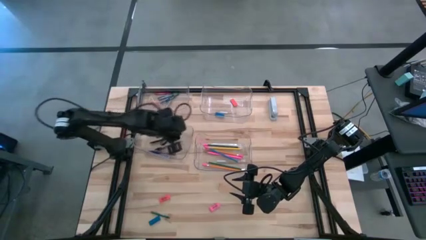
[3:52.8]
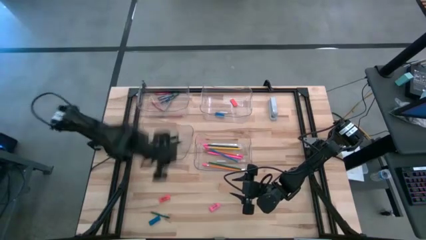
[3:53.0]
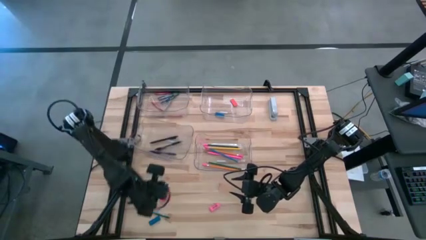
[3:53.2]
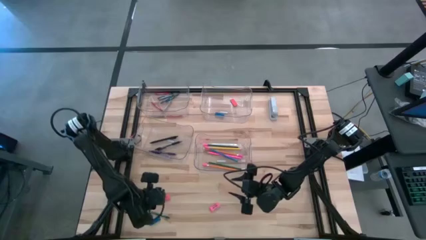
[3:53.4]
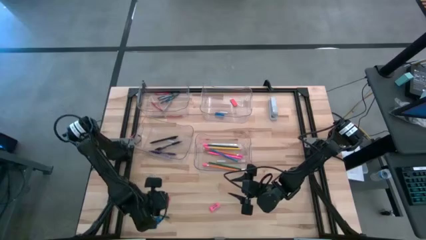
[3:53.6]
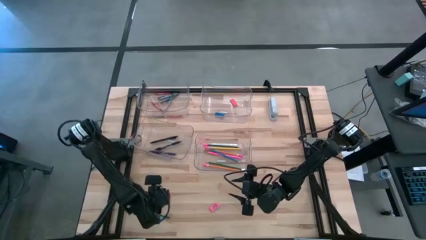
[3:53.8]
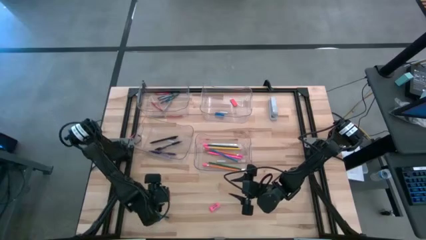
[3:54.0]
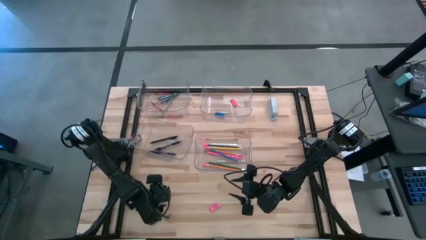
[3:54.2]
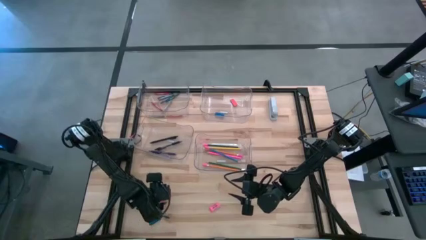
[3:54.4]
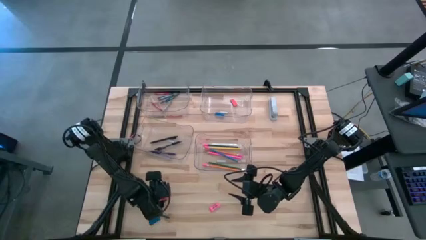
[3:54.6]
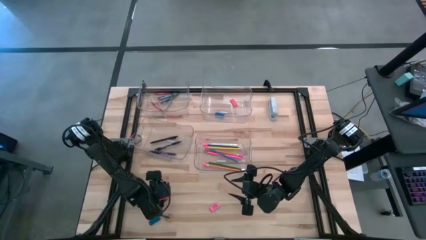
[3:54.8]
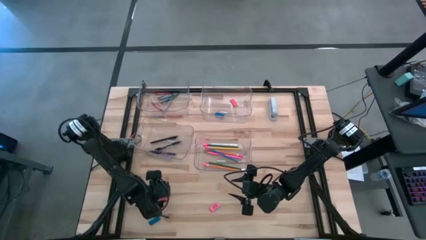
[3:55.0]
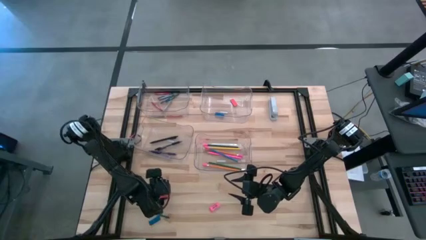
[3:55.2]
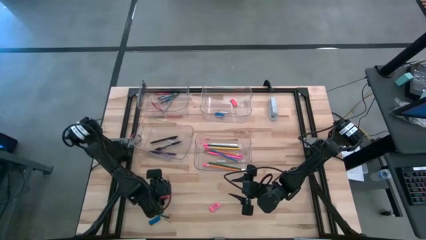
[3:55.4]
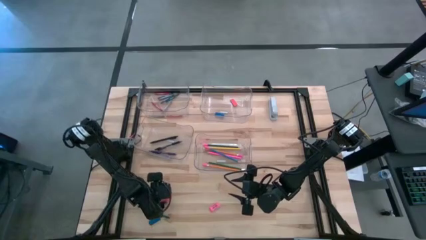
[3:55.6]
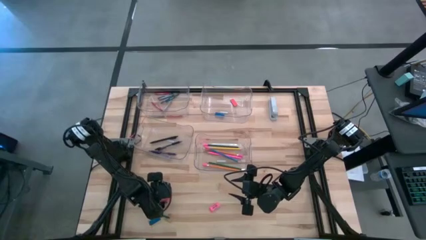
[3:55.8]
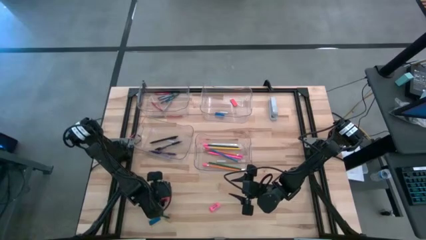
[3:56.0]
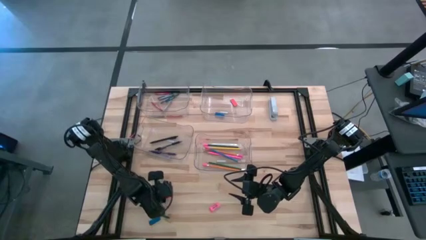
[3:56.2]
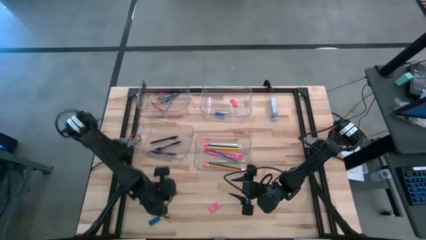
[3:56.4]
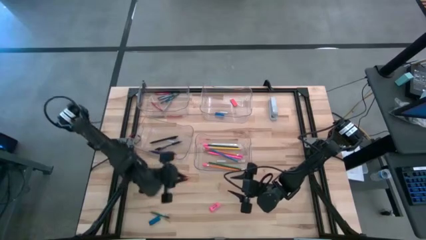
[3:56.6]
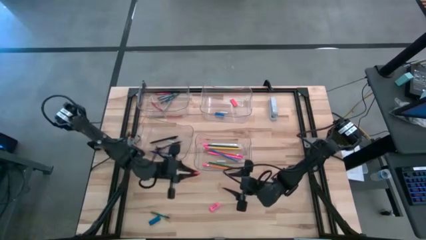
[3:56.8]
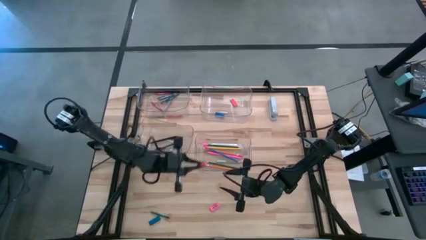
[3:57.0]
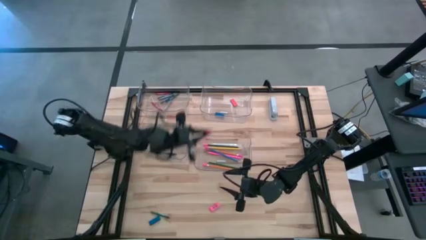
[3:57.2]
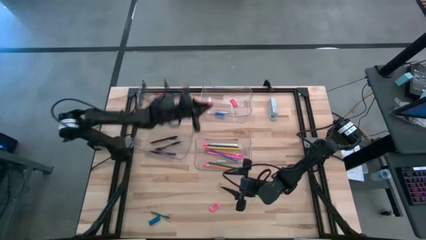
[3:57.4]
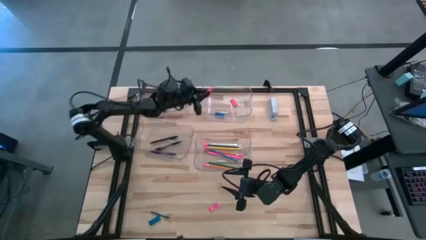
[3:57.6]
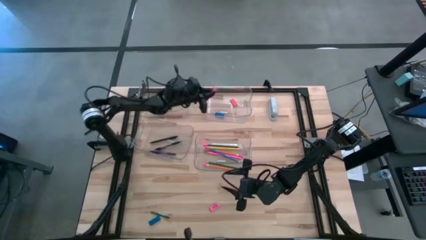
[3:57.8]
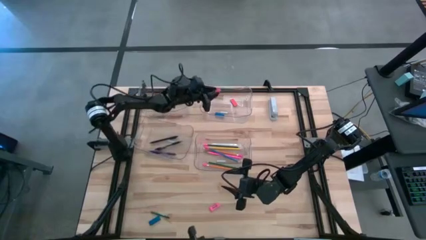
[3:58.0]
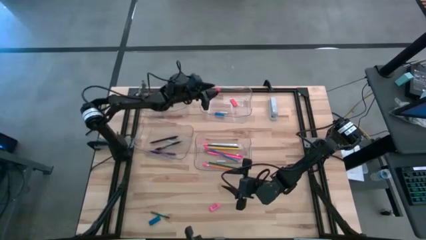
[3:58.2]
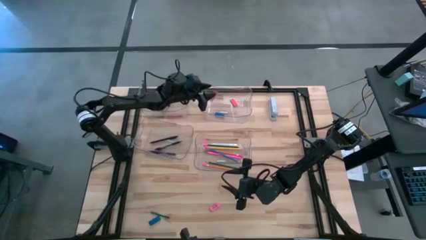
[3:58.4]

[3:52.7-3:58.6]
Task: Sort crayons/erasers/pens/pencils in bins
Put the orange eraser into the top right transparent bin

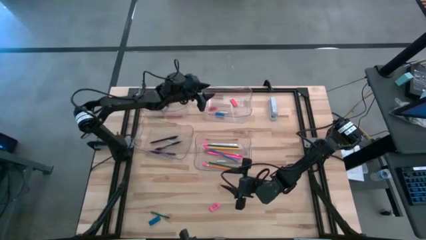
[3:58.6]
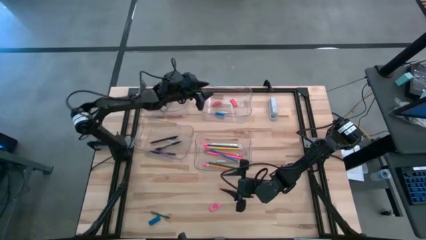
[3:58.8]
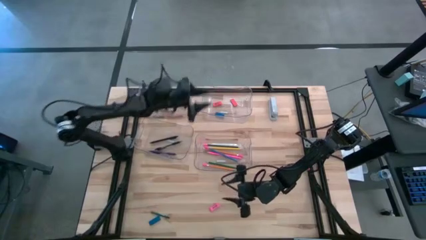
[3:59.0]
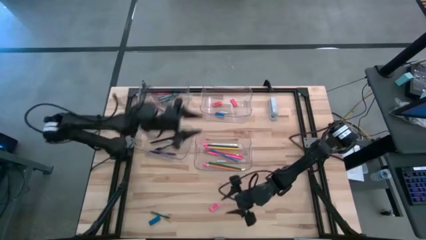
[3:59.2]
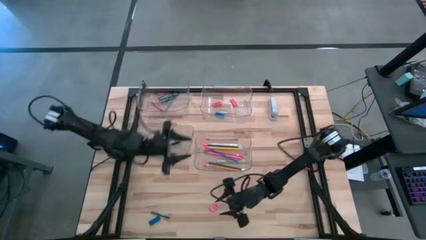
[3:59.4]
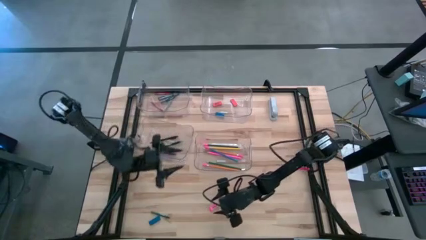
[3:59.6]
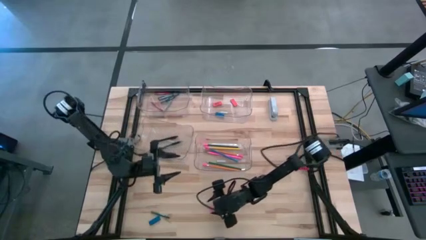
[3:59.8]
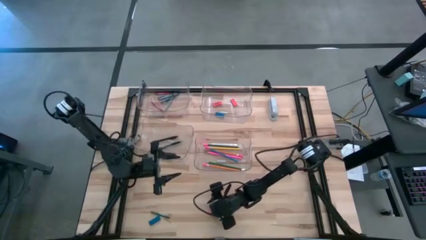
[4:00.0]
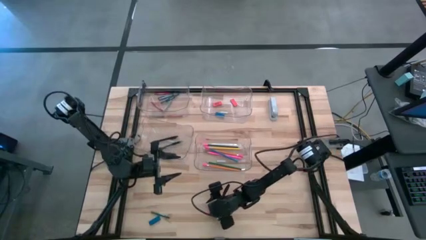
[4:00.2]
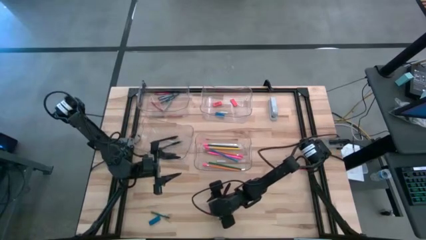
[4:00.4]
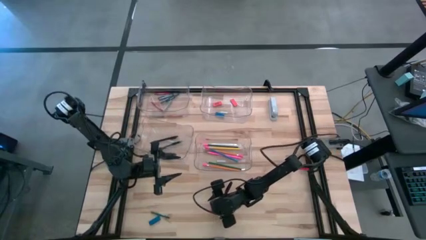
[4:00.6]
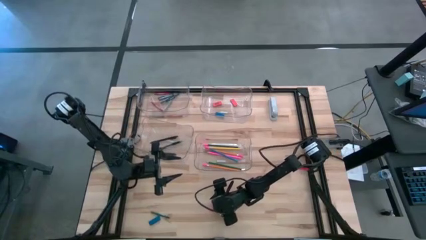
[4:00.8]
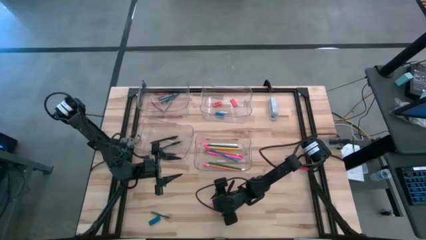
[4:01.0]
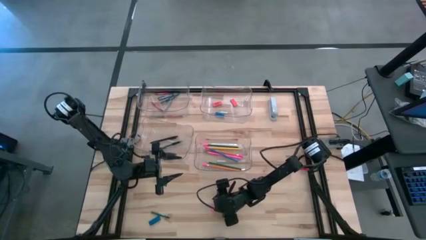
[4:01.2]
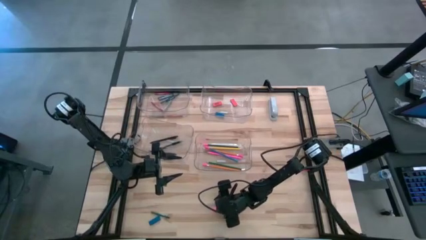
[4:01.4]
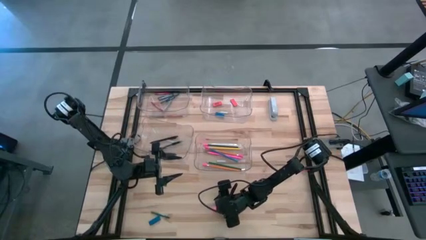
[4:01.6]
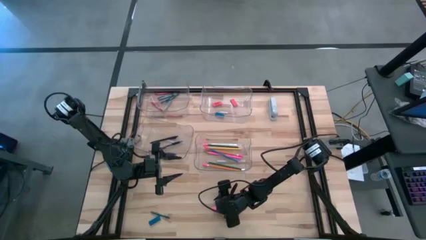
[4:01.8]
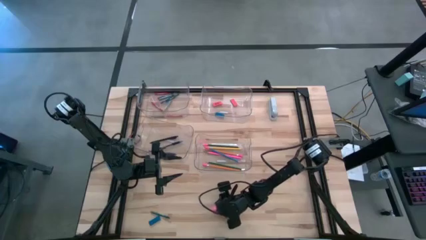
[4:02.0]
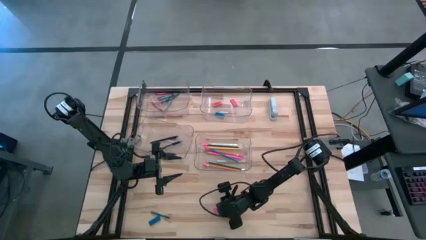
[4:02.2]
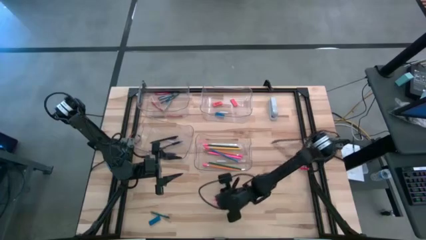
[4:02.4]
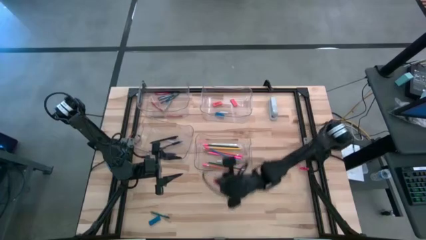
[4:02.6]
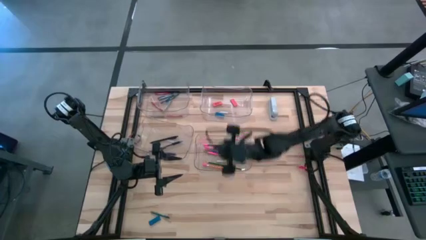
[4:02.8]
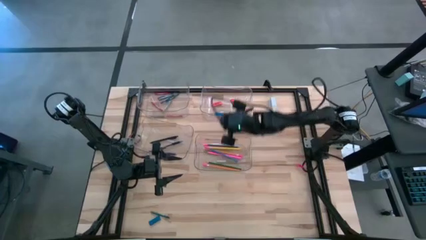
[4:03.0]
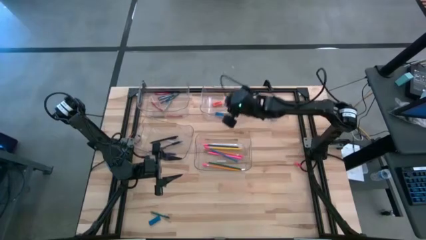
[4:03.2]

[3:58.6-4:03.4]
Put the pink eraser into the top right transparent bin

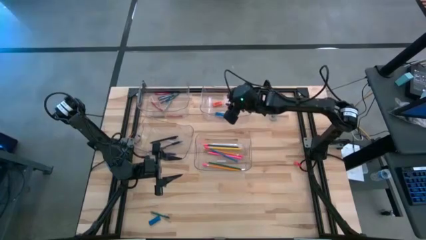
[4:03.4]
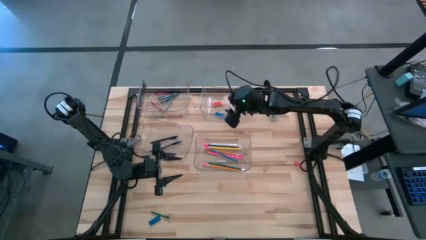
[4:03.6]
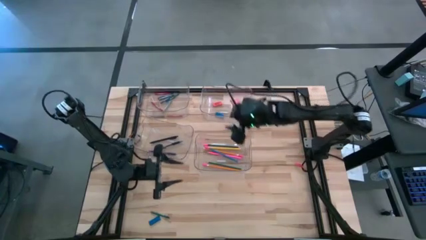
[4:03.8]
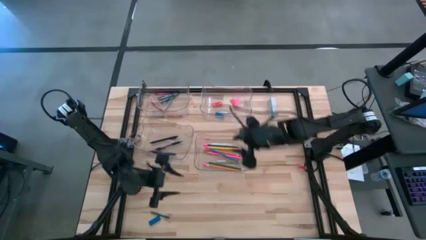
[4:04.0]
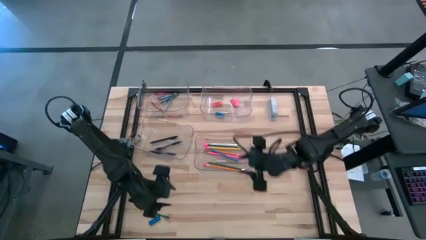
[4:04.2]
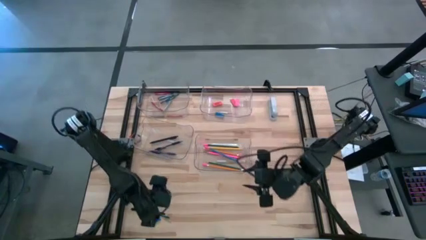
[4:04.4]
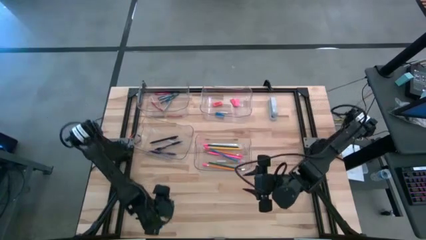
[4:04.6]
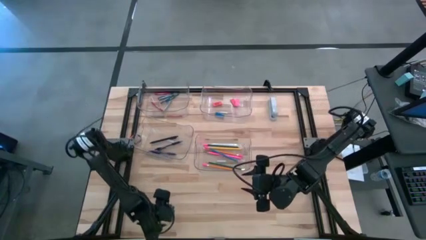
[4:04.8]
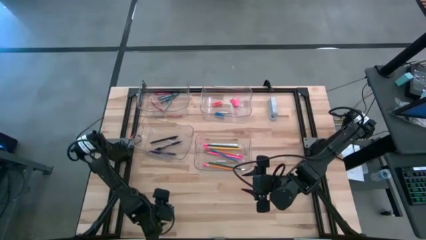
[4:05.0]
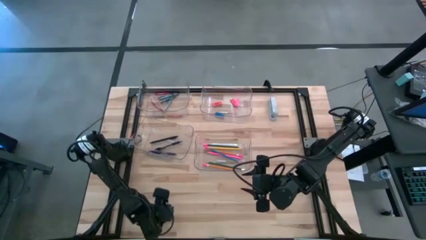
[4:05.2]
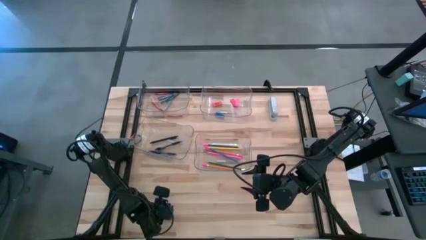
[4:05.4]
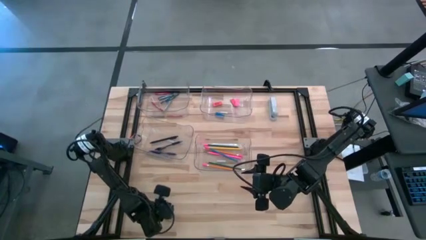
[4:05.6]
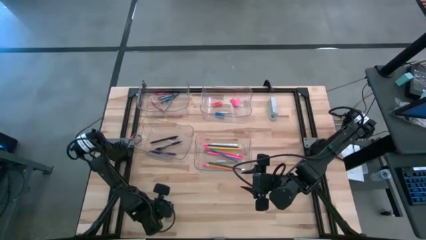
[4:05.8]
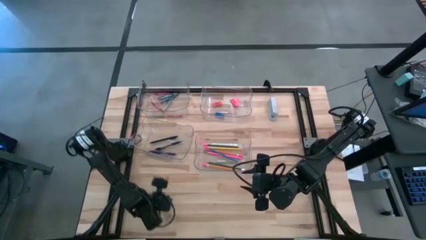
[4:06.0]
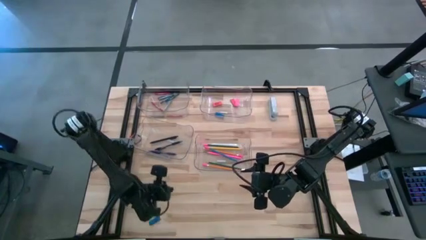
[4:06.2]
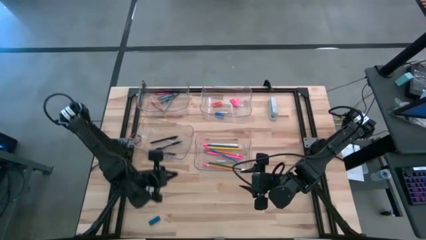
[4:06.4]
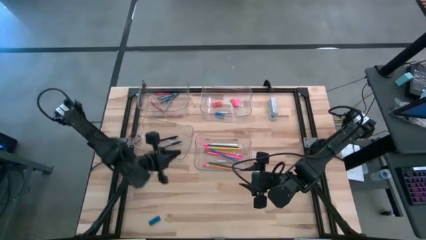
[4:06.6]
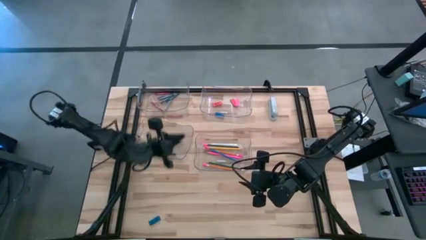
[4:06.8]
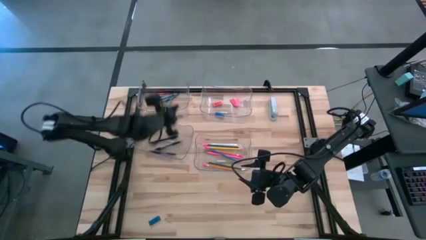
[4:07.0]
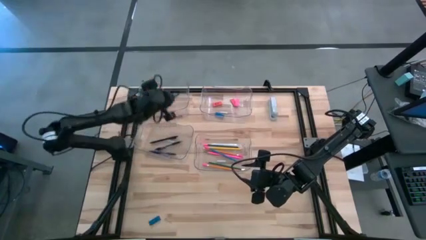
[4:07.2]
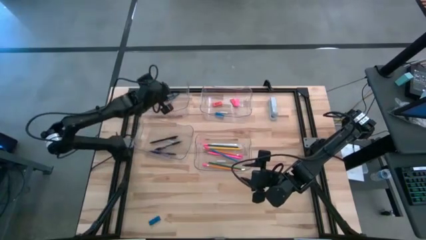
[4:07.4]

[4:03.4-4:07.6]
Put the green crayon into the top left transparent bin
